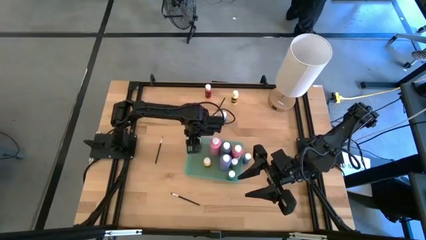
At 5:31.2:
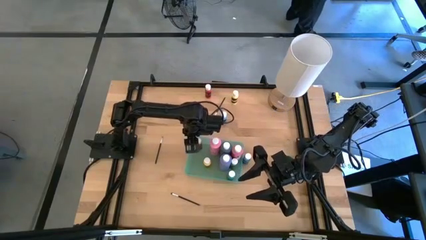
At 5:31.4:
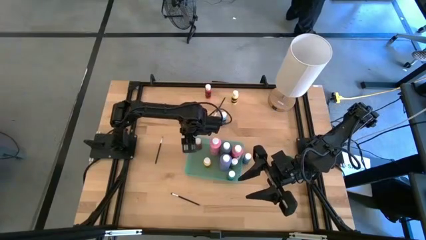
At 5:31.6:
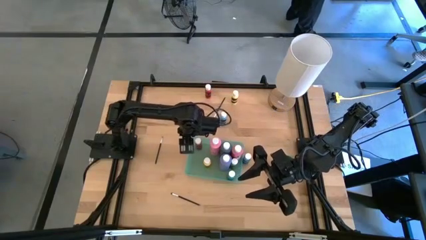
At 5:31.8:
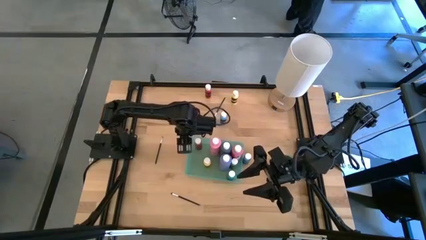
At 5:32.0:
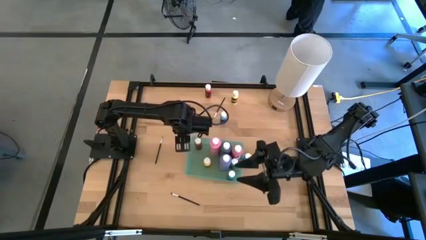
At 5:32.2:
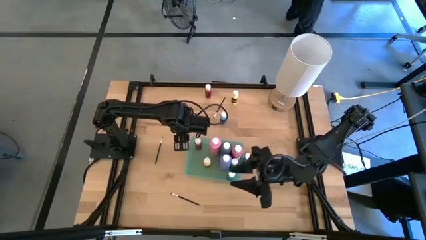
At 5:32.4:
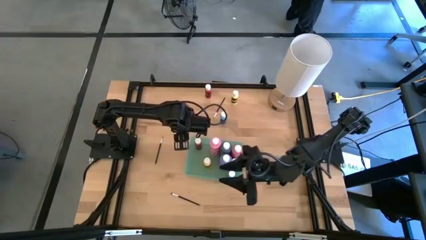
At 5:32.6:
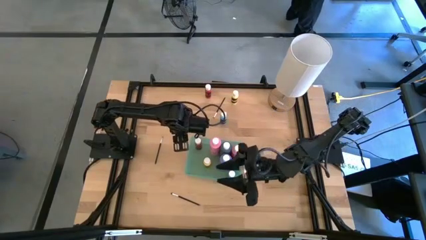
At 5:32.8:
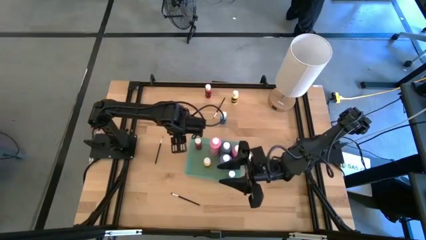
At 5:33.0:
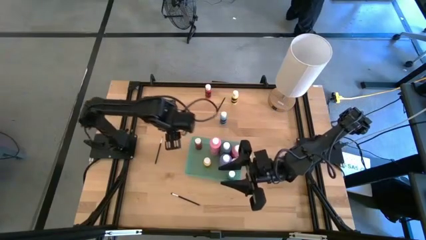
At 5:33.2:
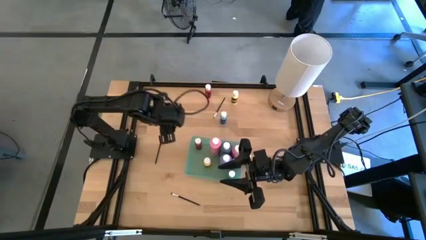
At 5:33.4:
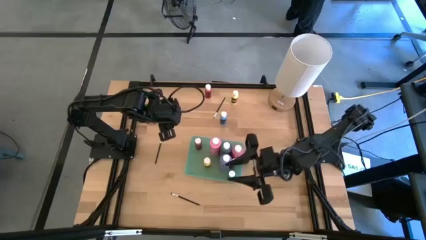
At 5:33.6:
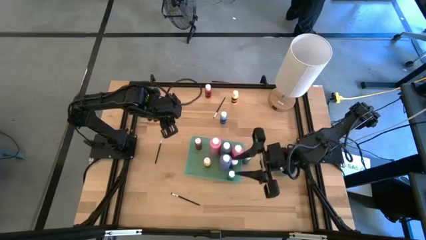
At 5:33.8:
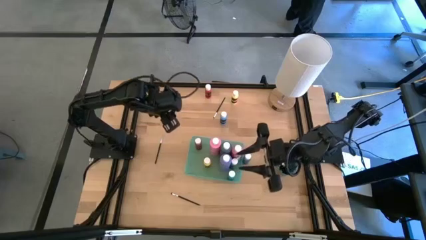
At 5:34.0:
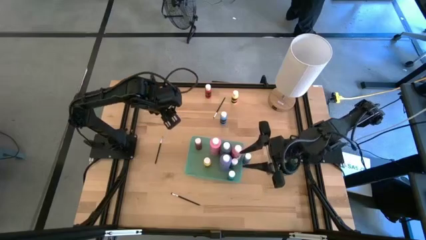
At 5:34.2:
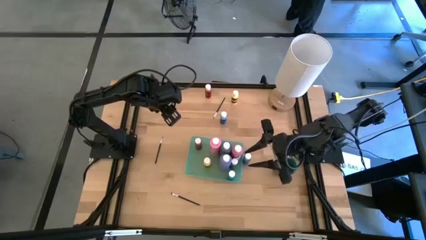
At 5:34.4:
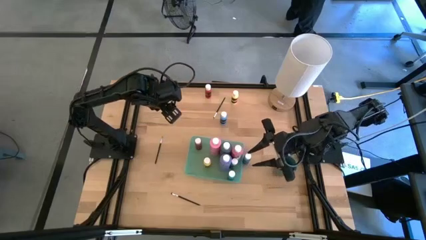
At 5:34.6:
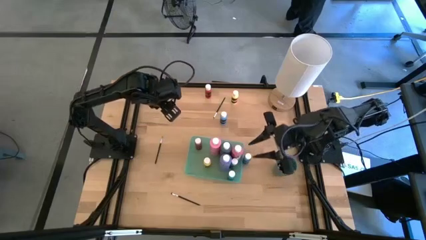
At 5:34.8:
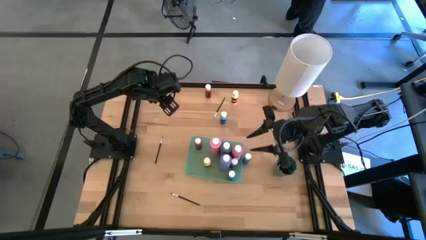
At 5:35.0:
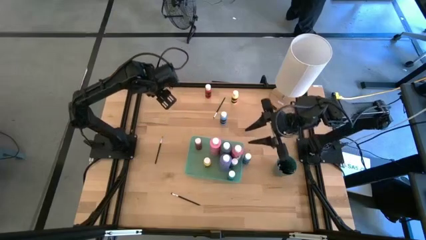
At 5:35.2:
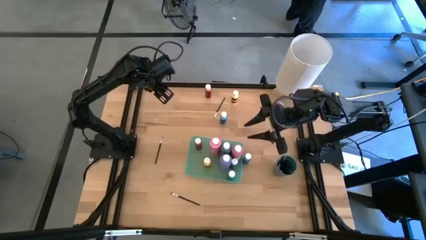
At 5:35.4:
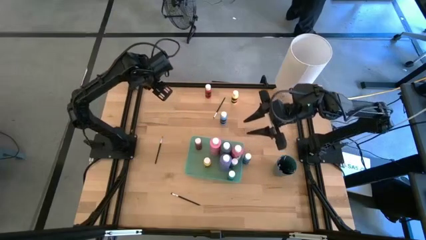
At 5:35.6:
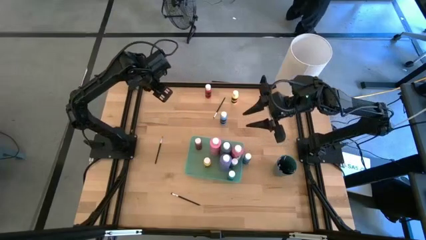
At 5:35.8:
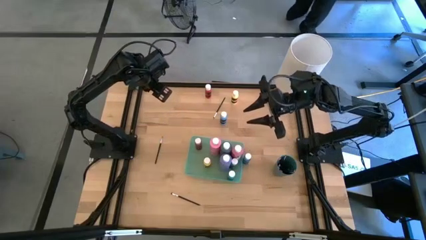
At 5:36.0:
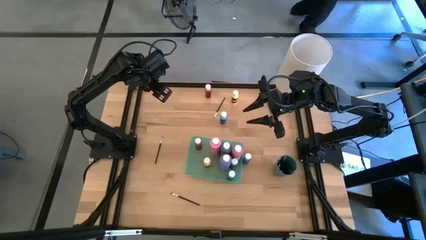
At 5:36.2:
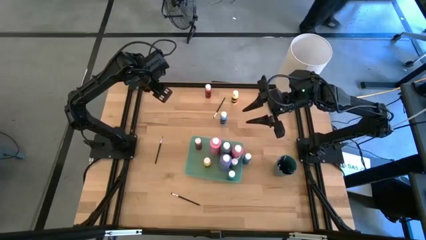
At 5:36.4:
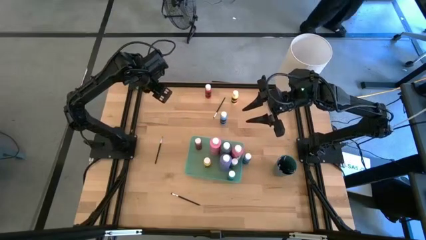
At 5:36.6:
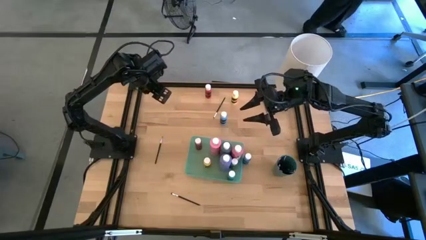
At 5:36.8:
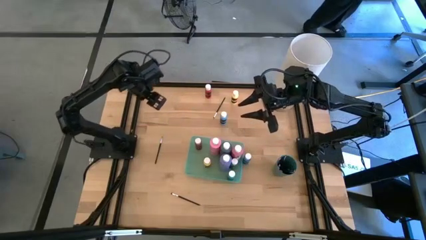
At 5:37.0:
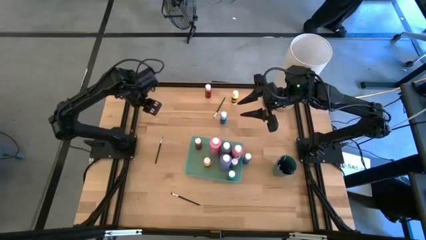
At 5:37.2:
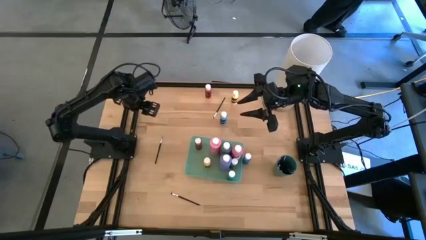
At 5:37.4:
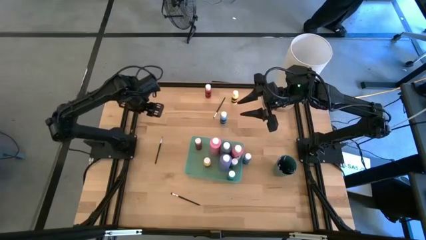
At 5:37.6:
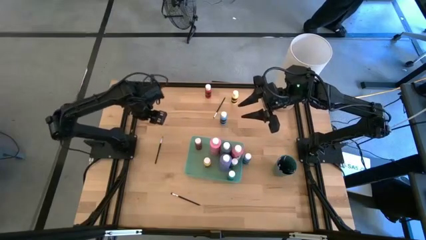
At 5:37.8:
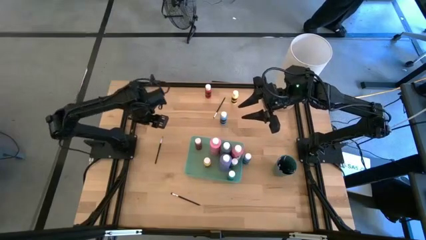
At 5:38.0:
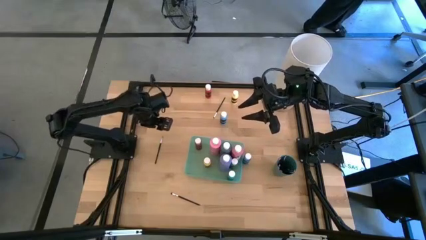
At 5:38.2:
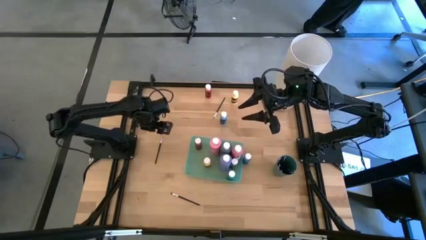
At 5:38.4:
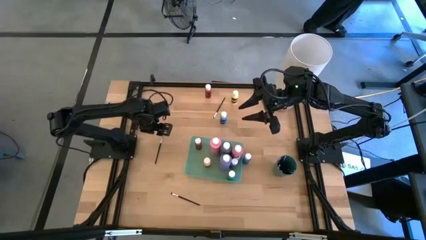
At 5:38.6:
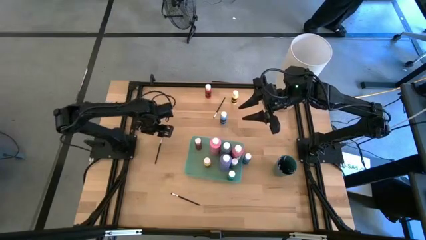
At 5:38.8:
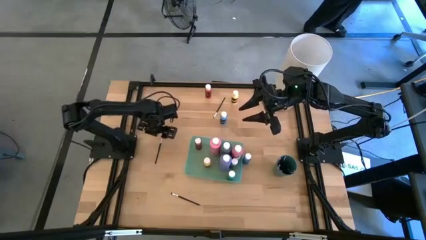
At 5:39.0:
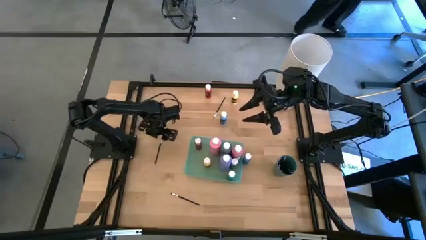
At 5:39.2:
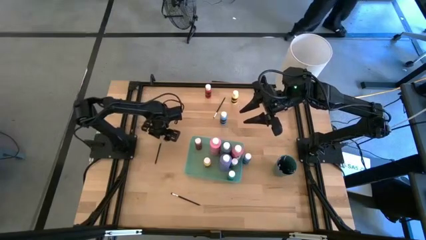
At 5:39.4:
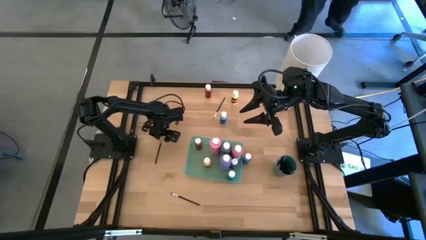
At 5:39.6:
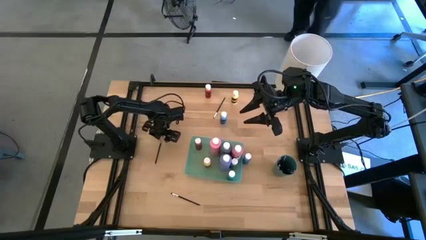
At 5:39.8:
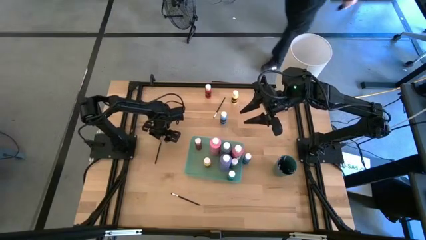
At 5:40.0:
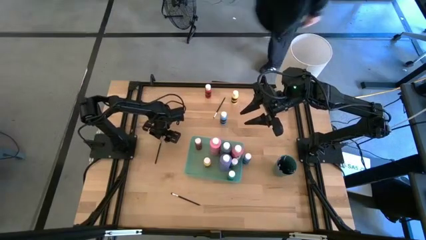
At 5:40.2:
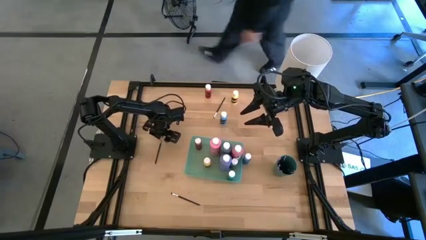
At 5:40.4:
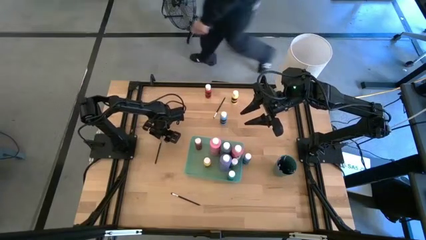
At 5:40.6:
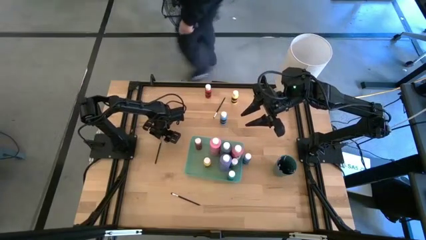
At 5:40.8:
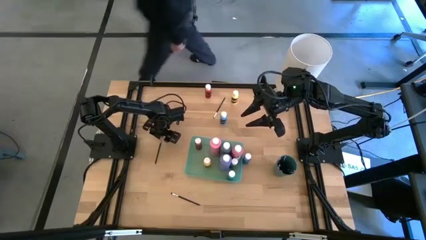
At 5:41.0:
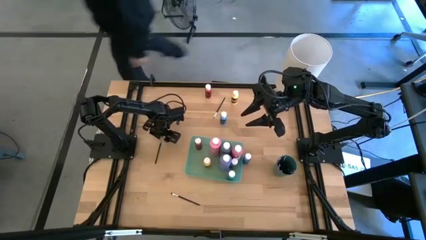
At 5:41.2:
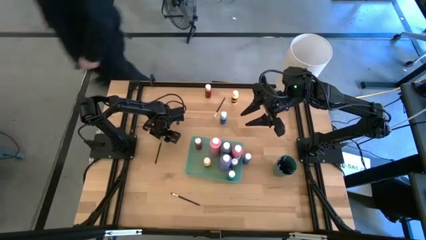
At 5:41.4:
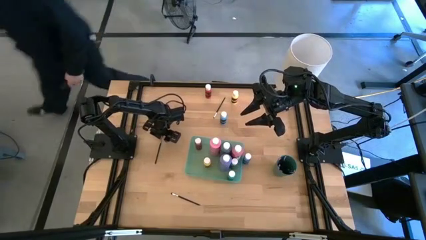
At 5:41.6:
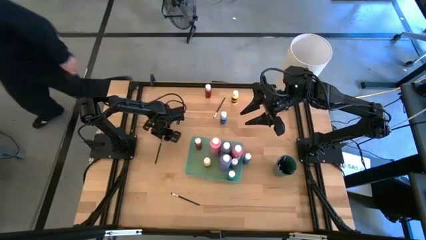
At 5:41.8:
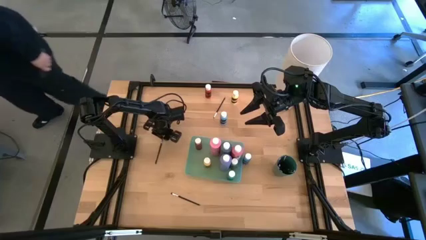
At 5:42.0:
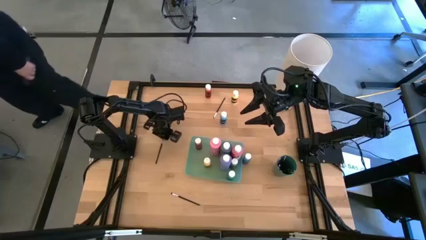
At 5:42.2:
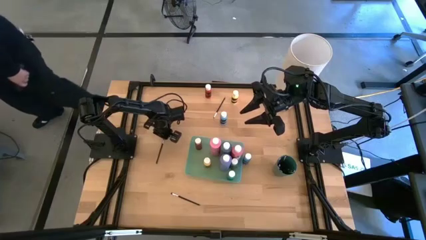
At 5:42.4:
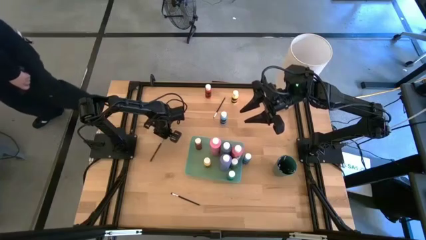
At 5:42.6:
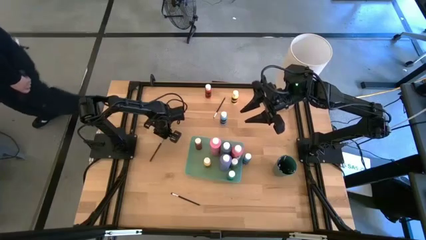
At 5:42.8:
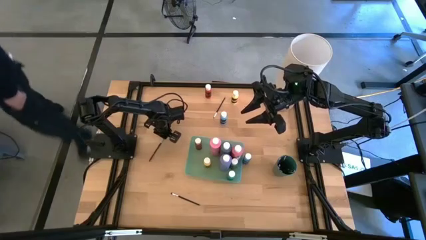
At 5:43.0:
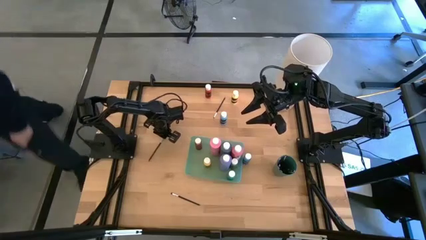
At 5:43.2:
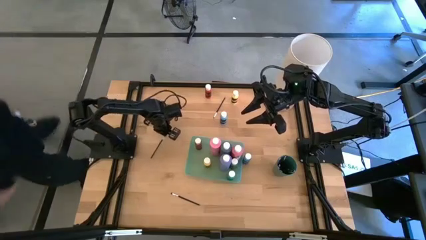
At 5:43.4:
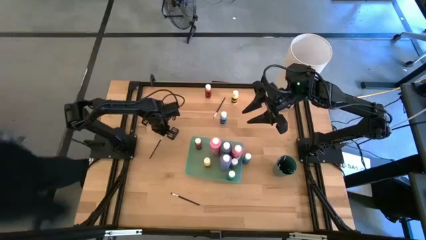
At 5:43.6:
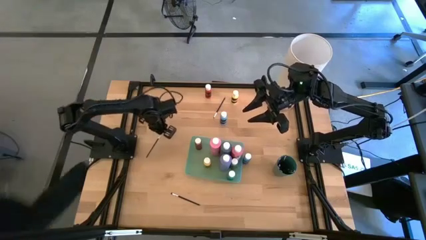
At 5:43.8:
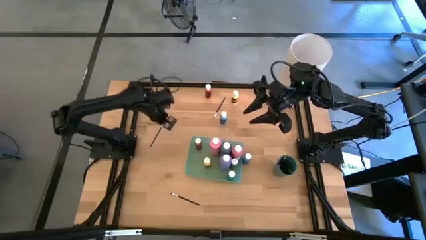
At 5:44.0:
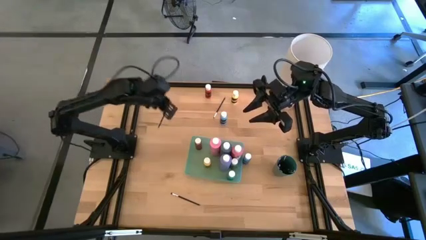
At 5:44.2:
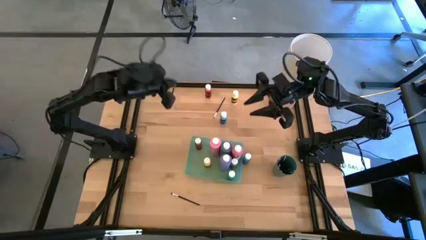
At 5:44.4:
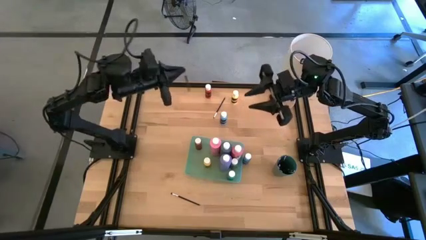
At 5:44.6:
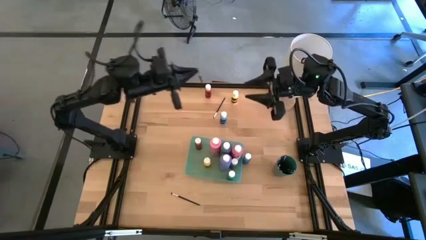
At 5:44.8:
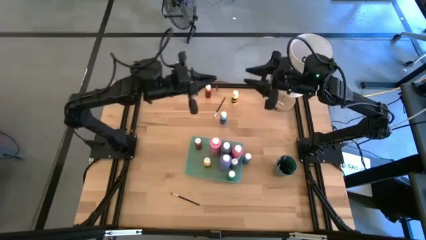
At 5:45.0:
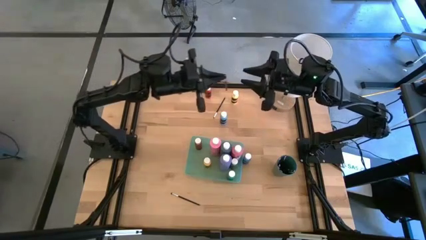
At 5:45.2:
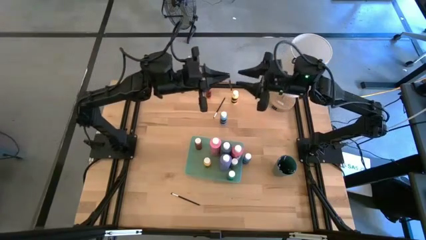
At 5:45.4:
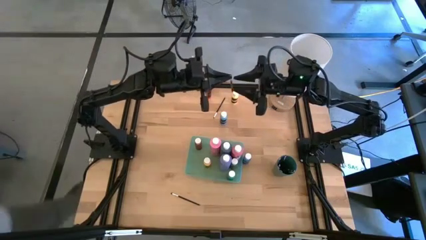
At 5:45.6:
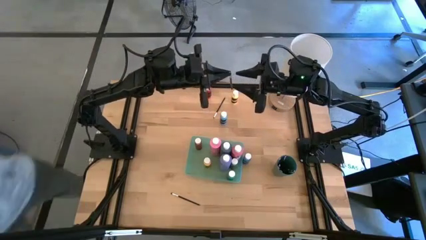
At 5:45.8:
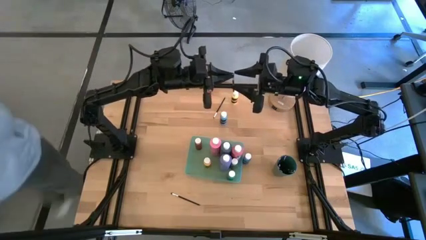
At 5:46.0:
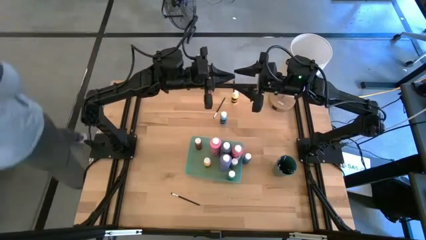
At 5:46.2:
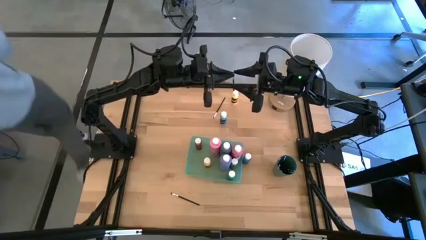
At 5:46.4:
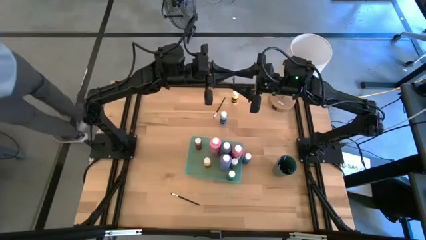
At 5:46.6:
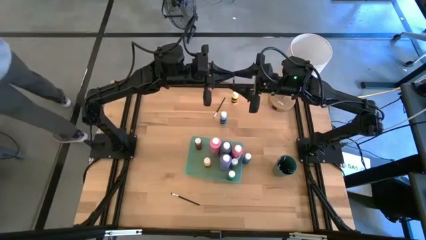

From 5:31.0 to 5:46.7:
Task: Pick & Place Paint Supplies
Put the black eyeshadow brush into the green cup
